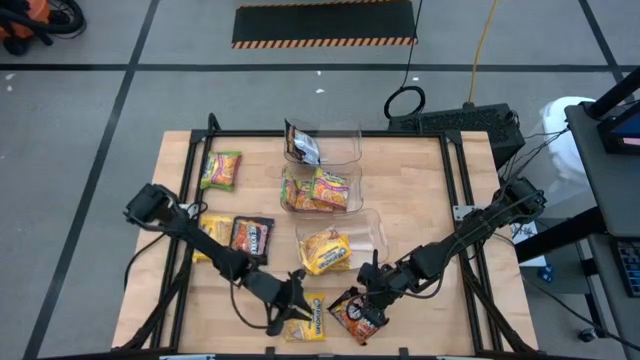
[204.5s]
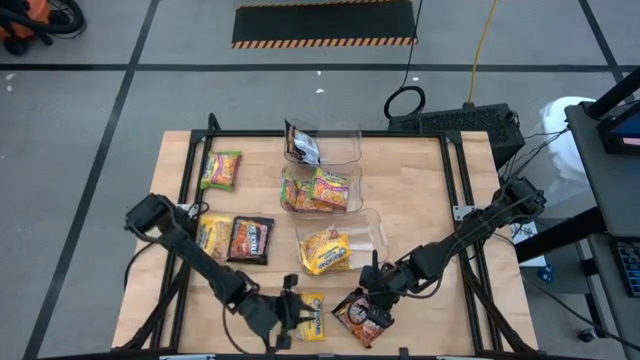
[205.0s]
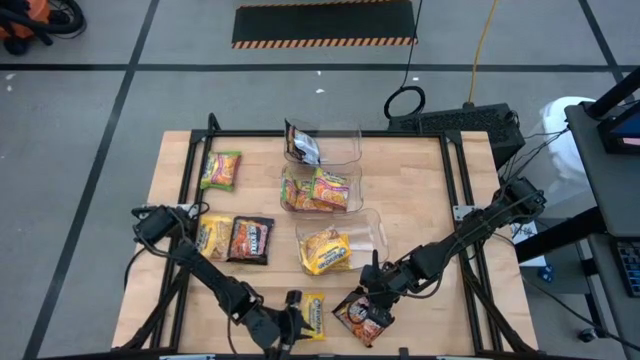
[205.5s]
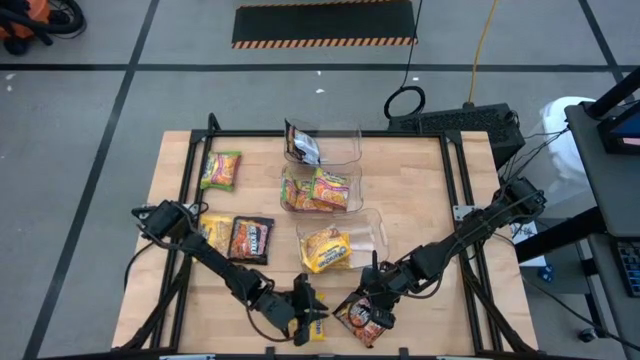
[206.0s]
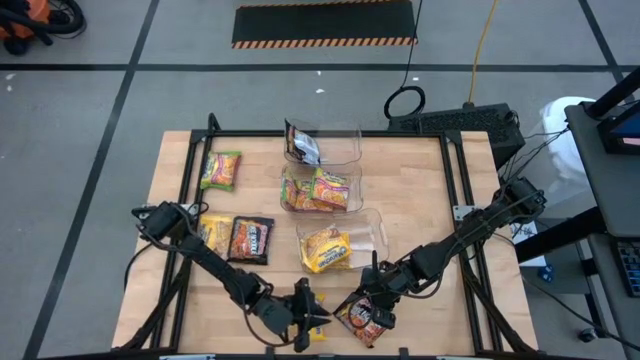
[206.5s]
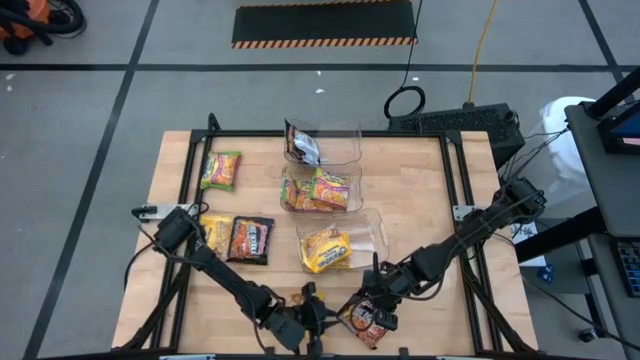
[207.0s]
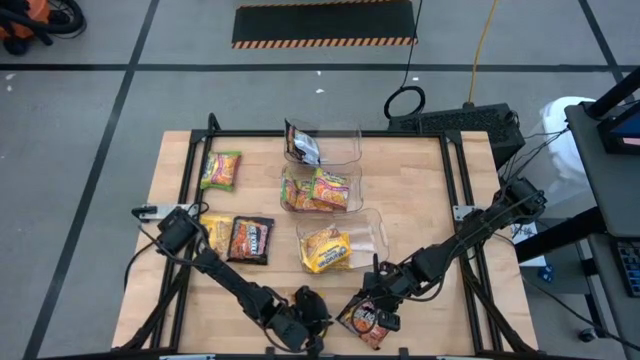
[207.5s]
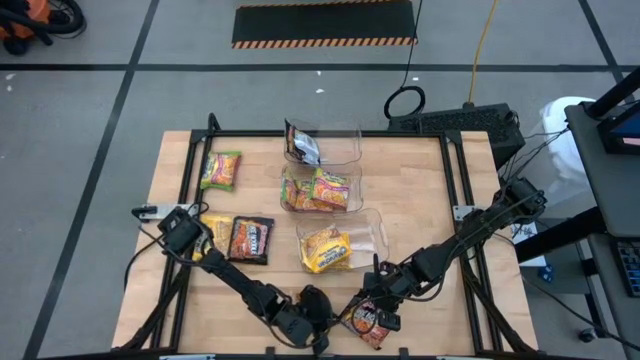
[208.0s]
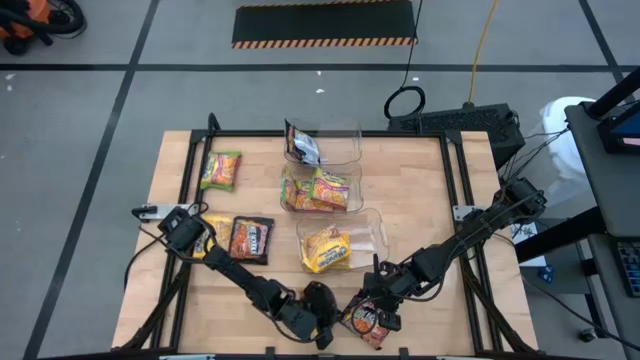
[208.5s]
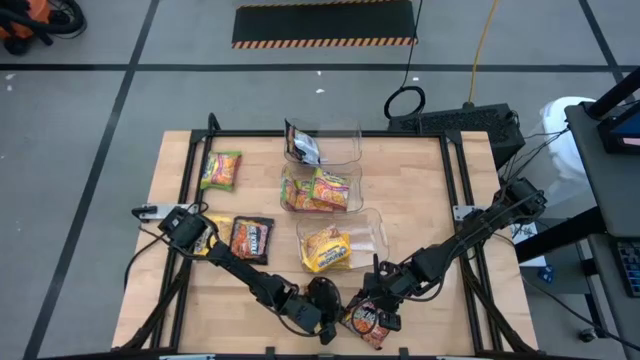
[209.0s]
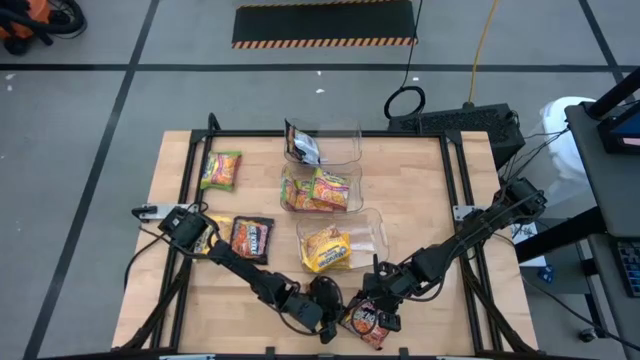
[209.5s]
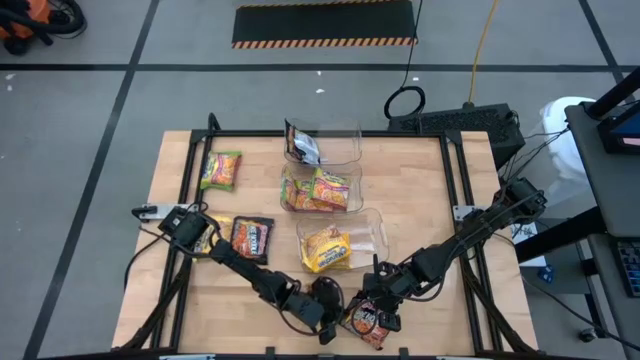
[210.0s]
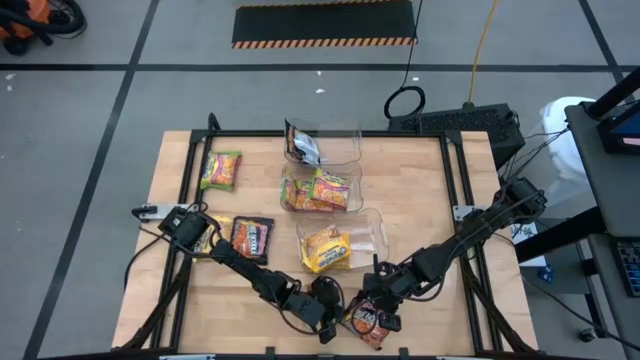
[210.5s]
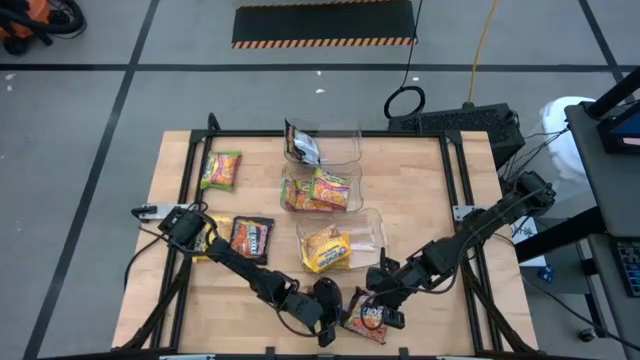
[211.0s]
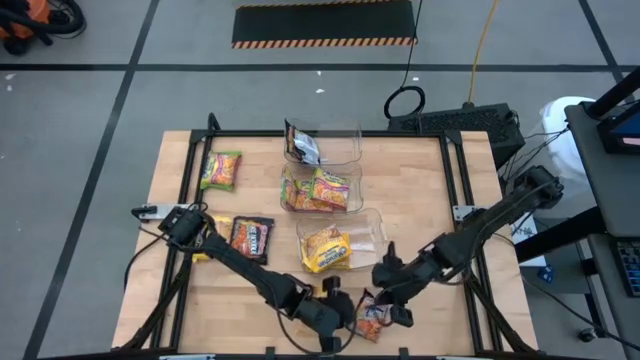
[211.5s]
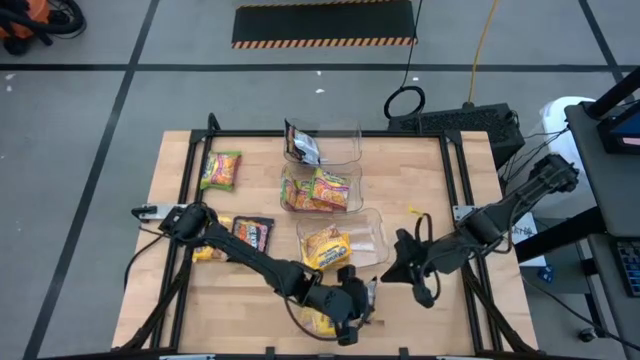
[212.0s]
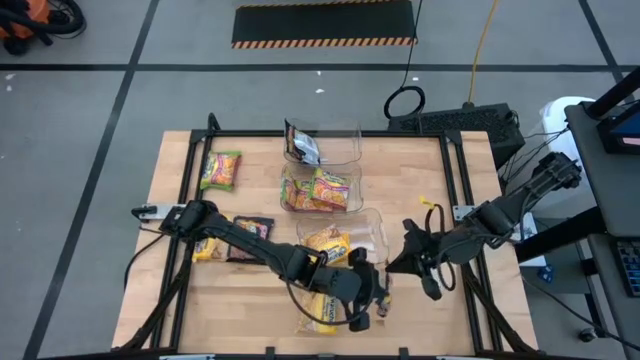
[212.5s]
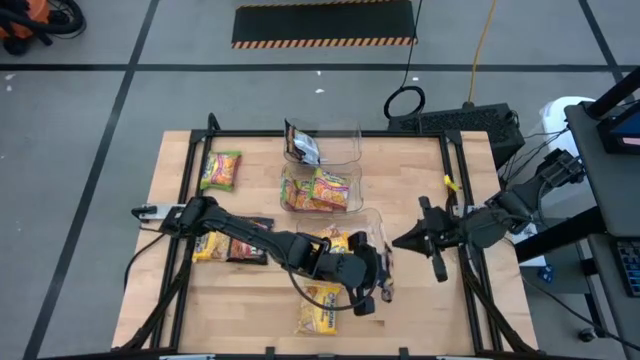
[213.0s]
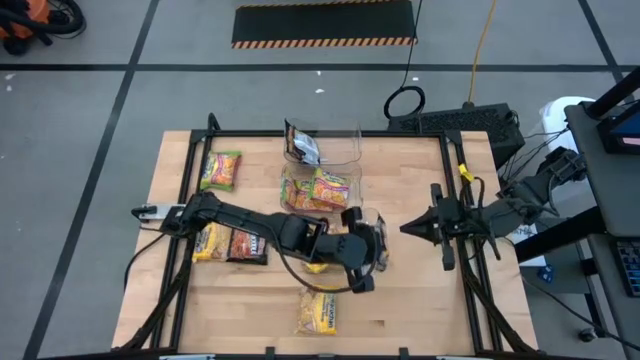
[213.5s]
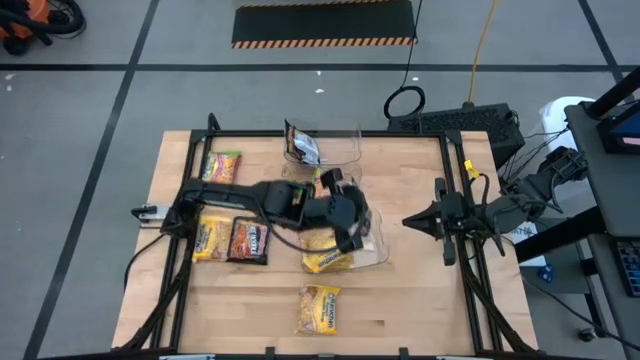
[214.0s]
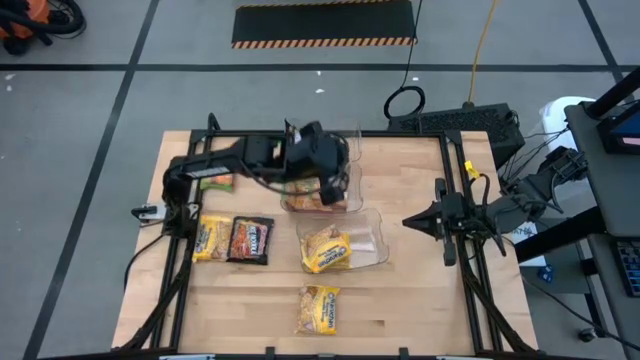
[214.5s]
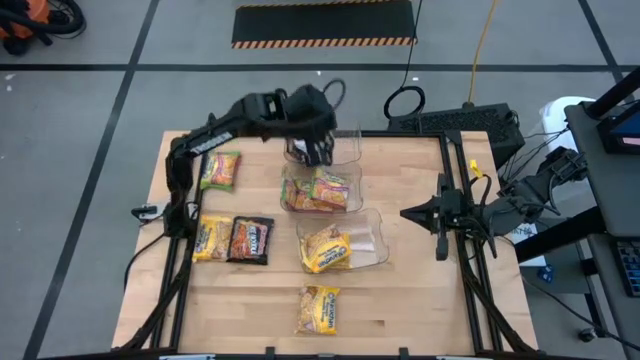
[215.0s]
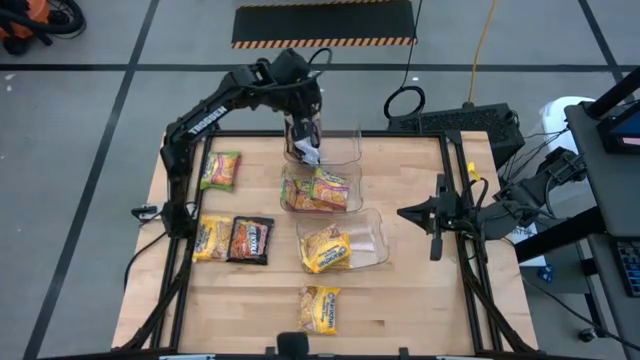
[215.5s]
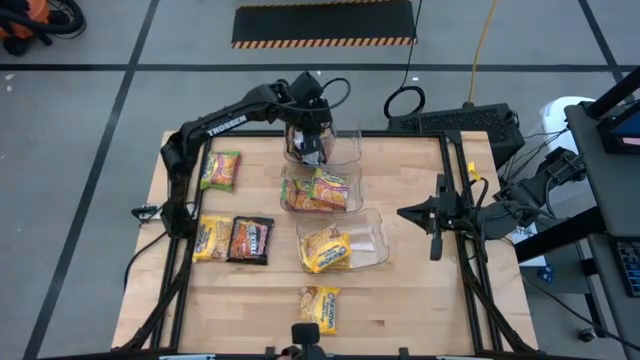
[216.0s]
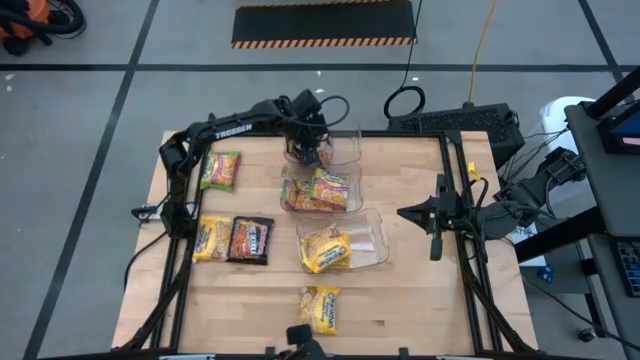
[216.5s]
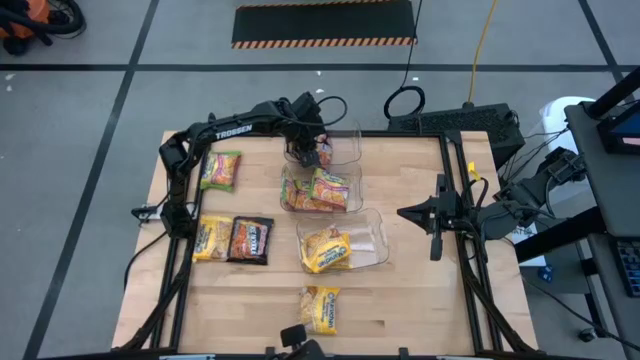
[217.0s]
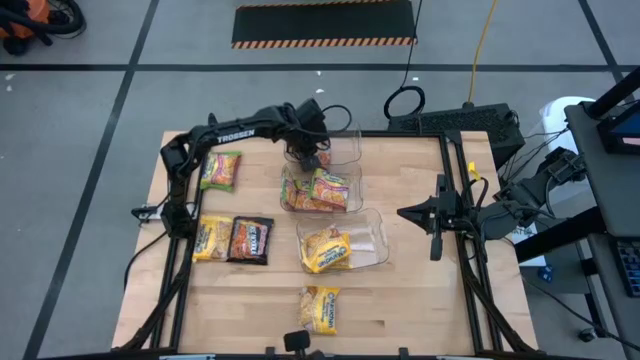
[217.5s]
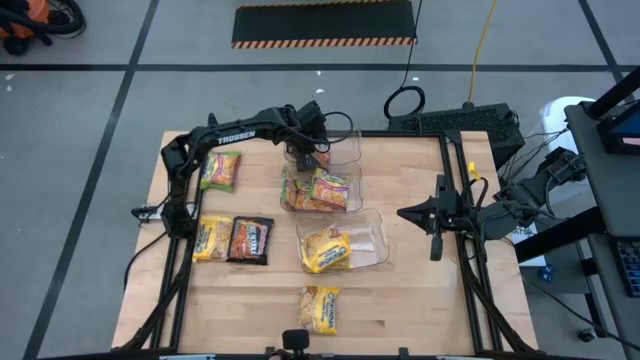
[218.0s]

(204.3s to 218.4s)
Task: Sort Maruchan noodles
Put the black noodle pack into the top transparent bin

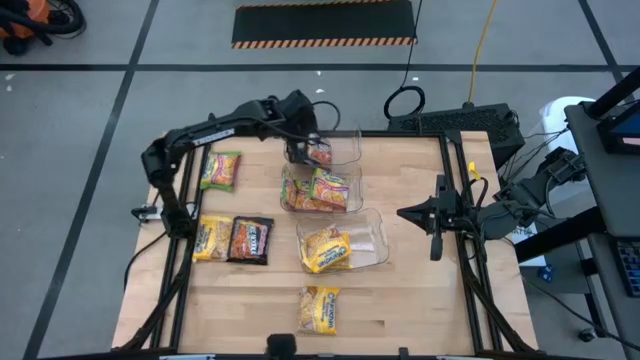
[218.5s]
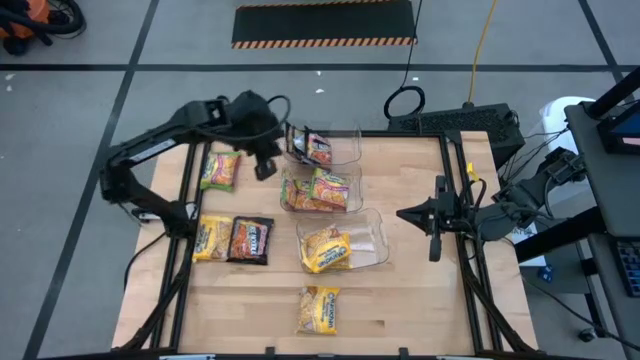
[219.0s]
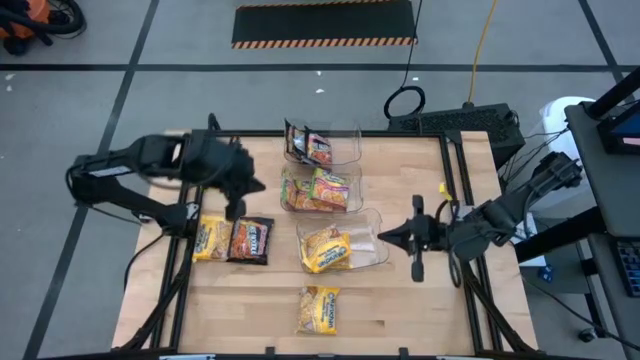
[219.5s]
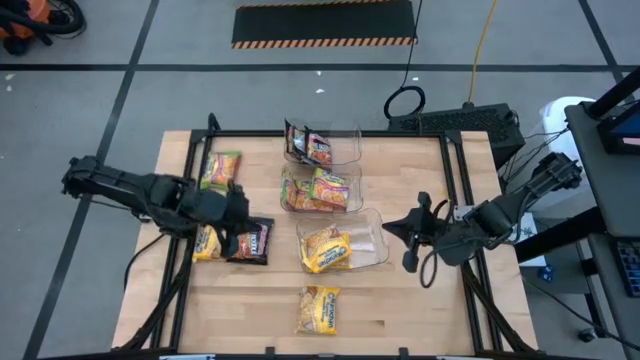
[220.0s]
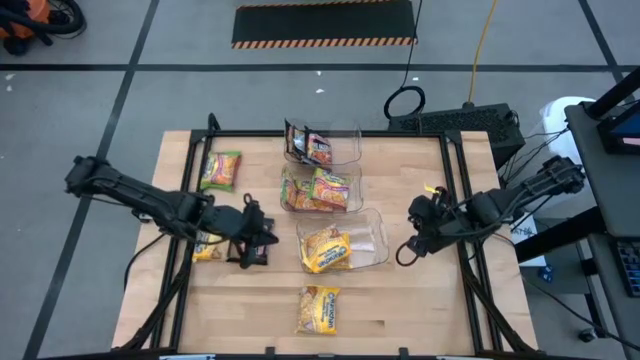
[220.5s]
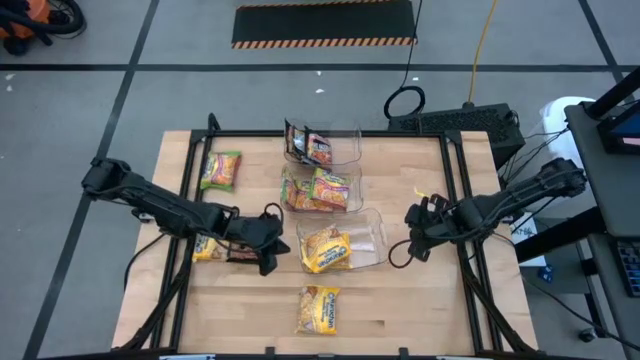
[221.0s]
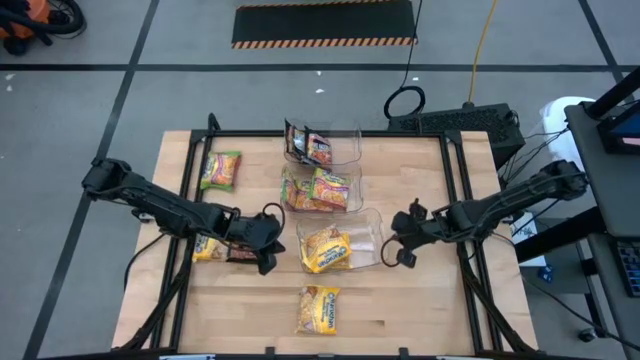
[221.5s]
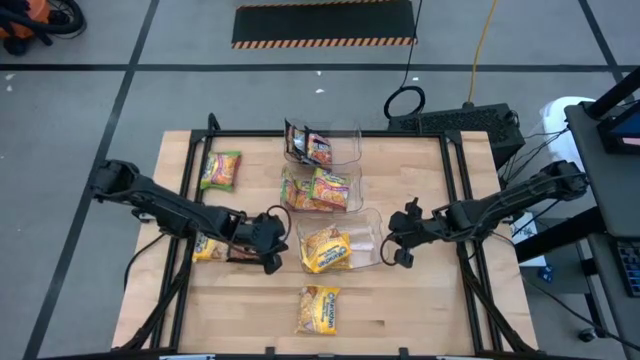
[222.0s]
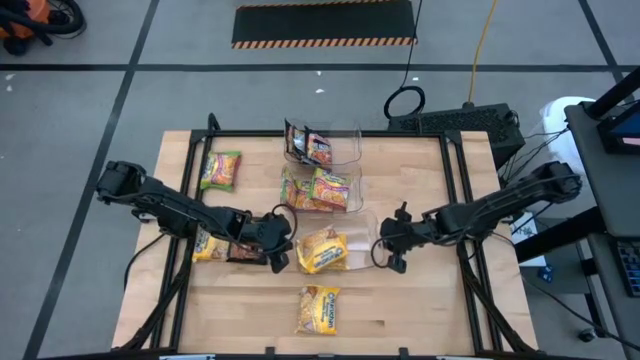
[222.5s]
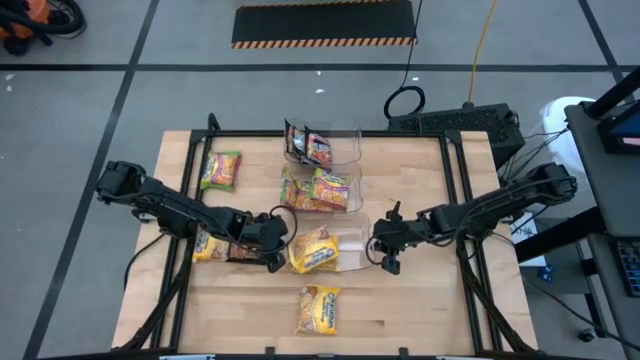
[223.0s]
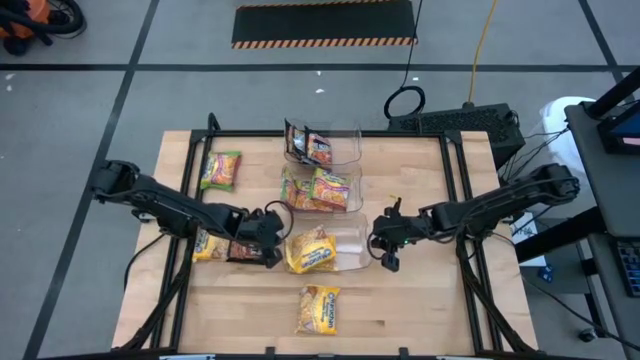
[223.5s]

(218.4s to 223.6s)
Adjust the bottom transparent bin

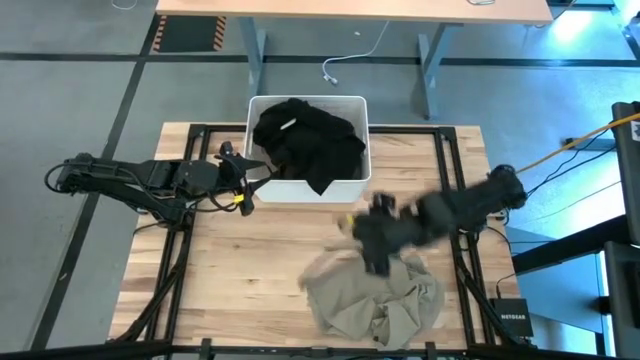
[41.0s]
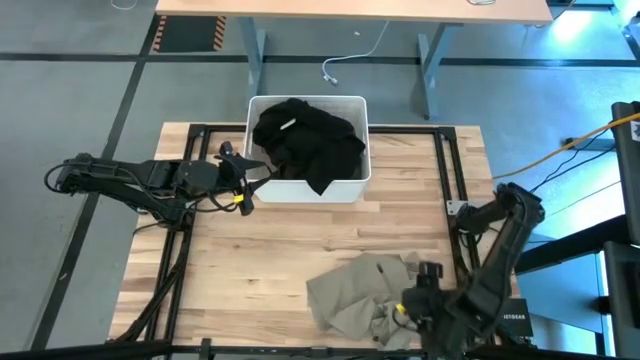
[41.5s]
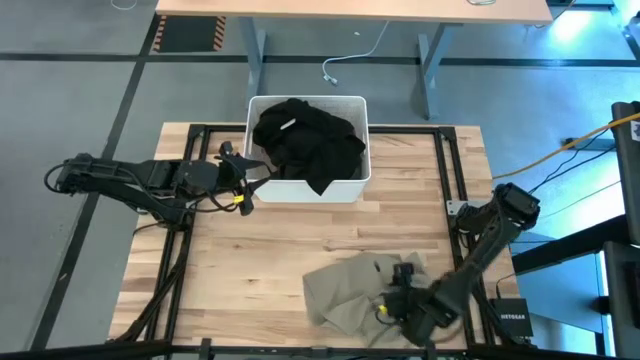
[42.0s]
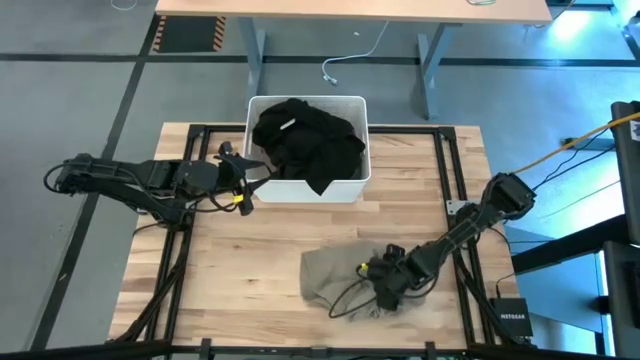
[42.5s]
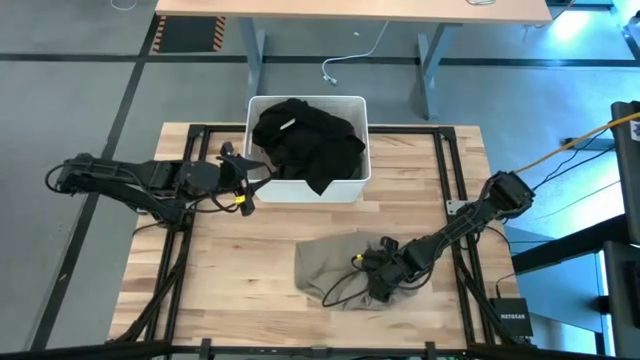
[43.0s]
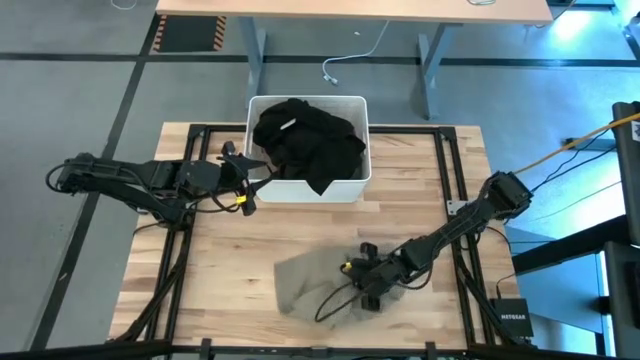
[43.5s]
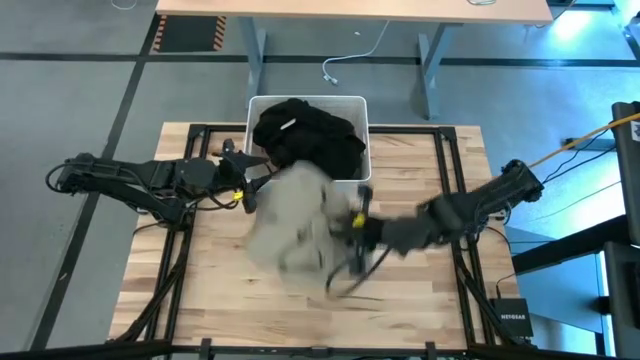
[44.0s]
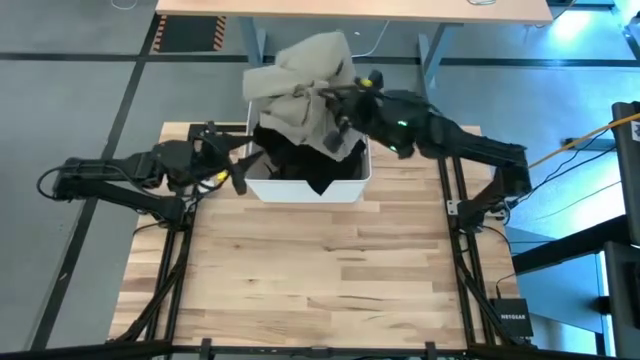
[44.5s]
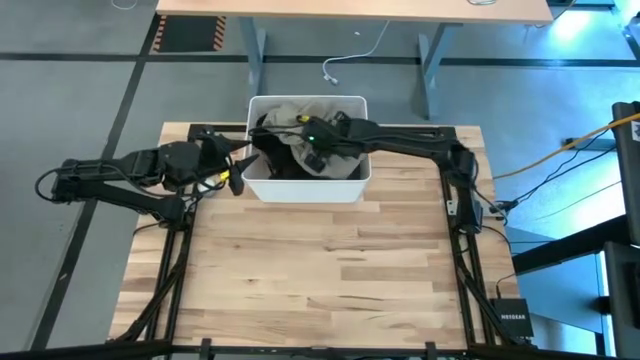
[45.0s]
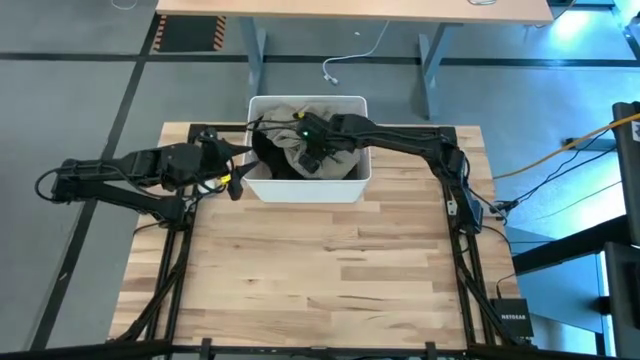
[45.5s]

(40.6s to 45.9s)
Task: Sort clothes
Put the brown shorts into the white laundry bin
